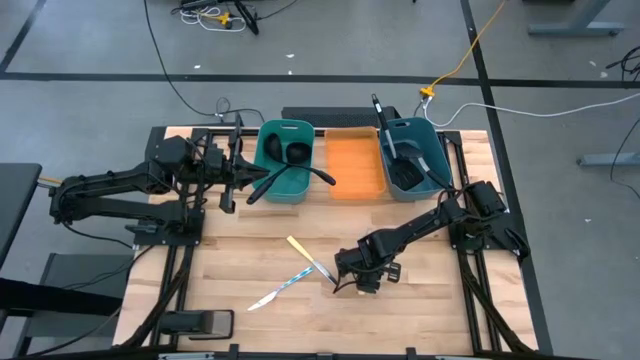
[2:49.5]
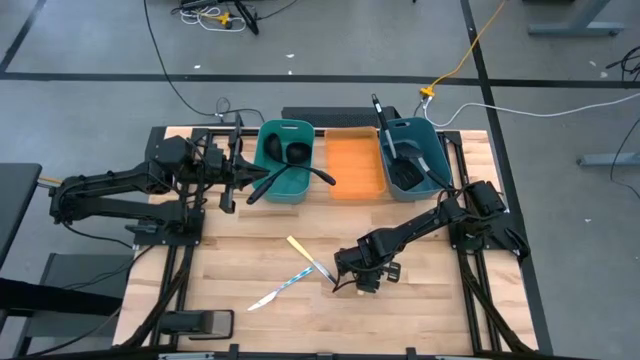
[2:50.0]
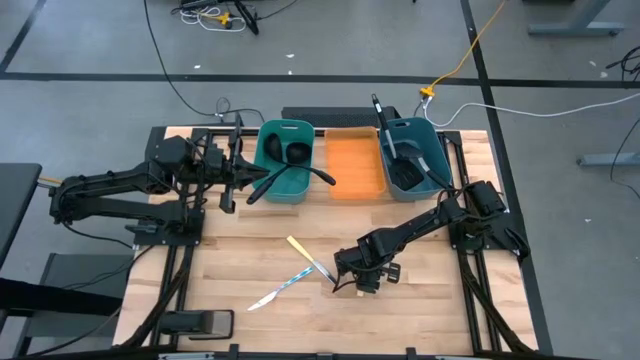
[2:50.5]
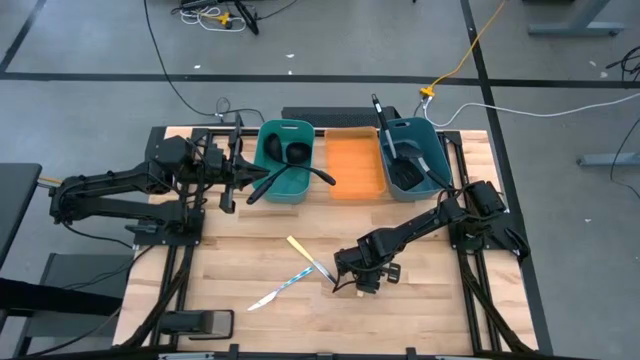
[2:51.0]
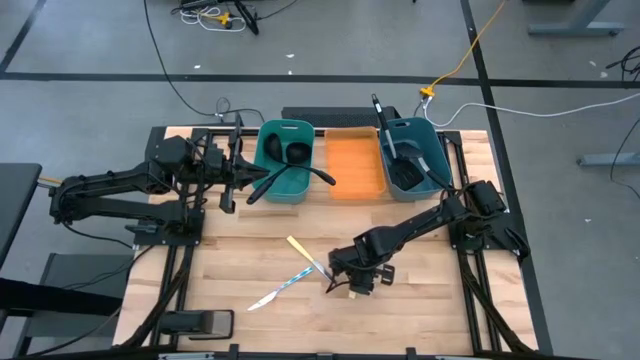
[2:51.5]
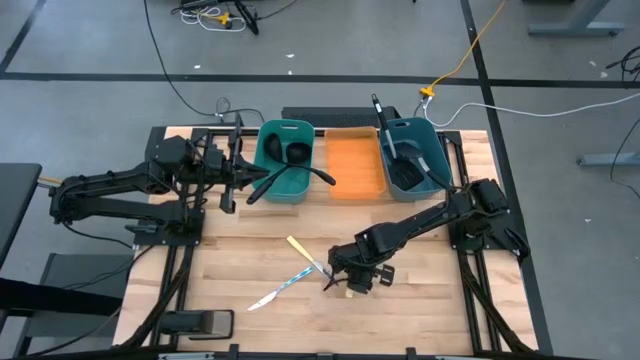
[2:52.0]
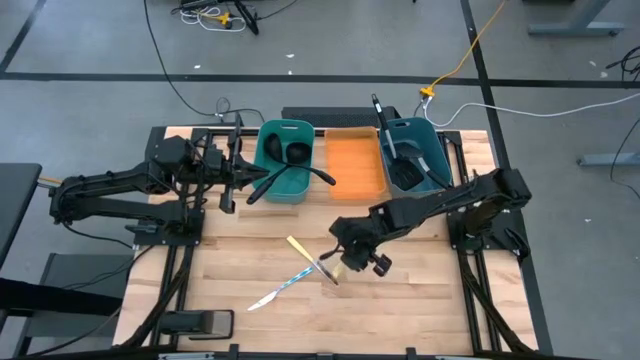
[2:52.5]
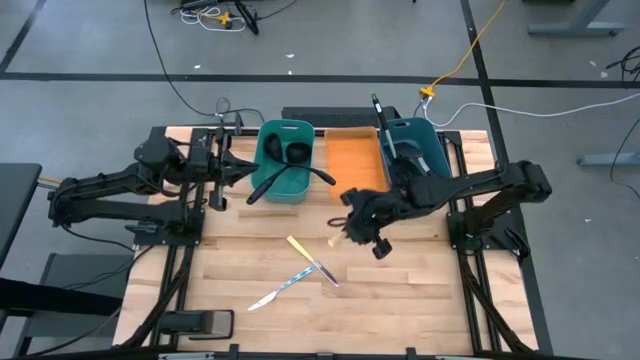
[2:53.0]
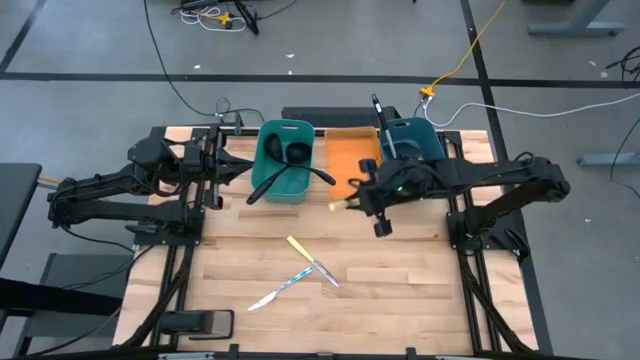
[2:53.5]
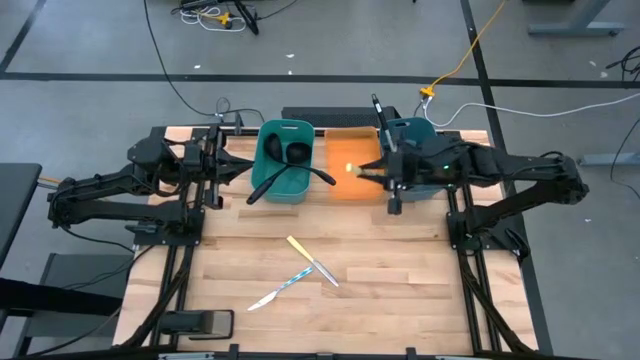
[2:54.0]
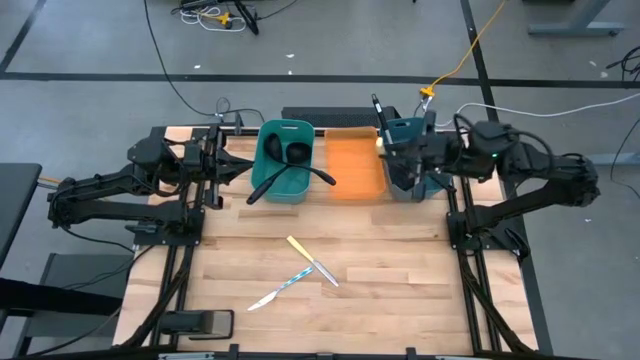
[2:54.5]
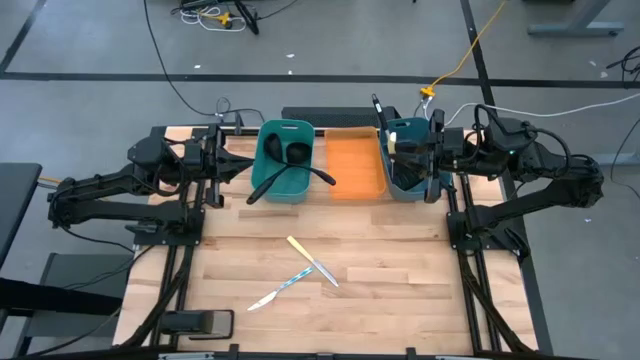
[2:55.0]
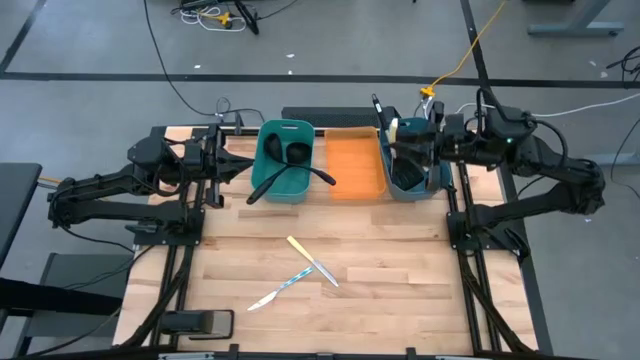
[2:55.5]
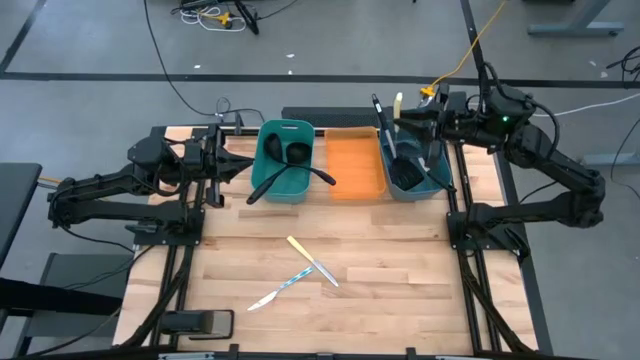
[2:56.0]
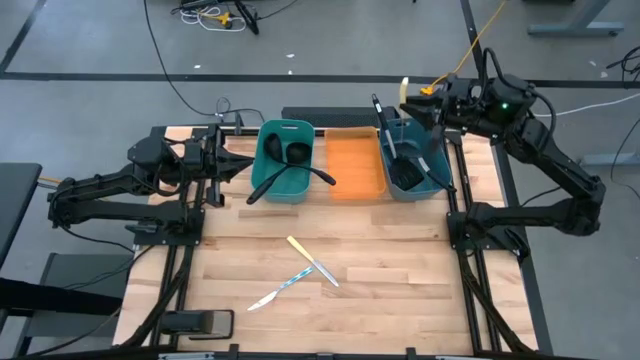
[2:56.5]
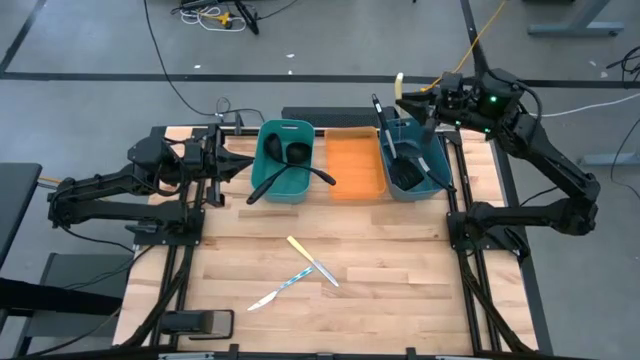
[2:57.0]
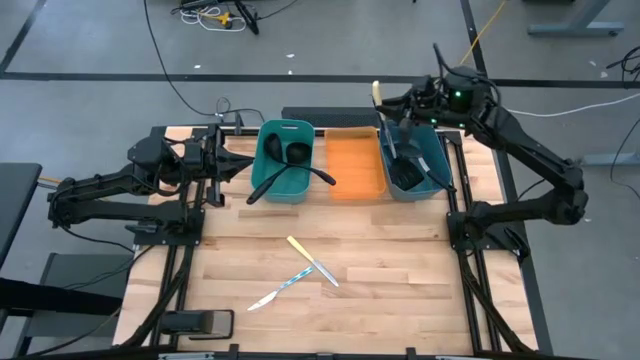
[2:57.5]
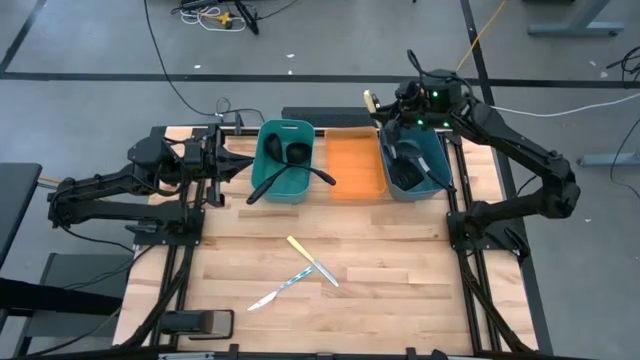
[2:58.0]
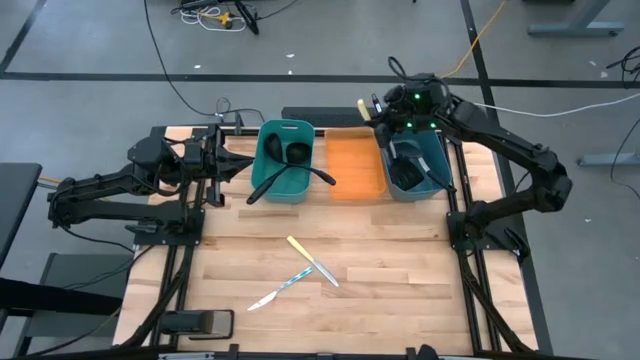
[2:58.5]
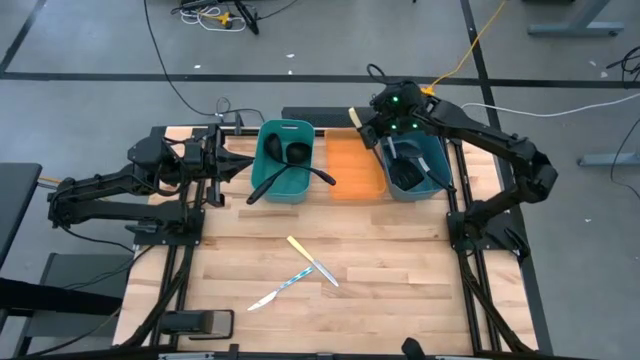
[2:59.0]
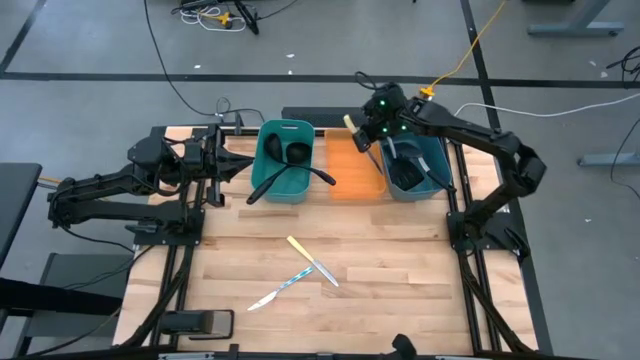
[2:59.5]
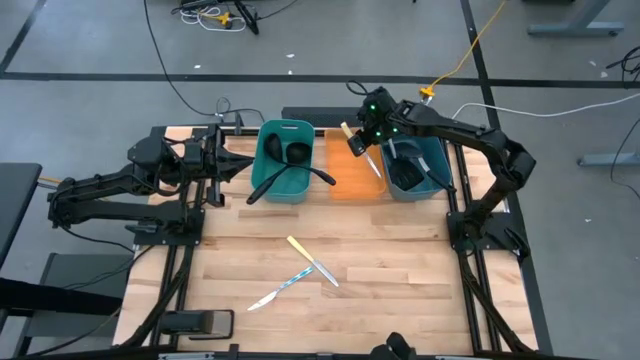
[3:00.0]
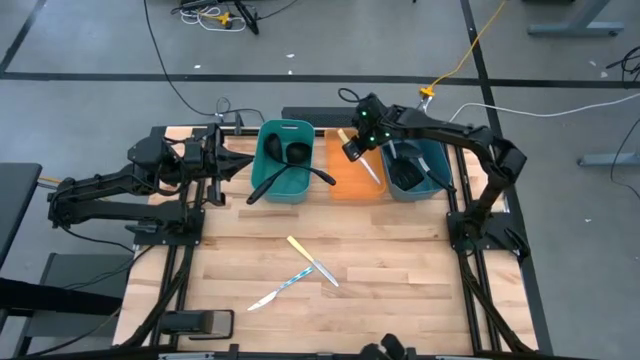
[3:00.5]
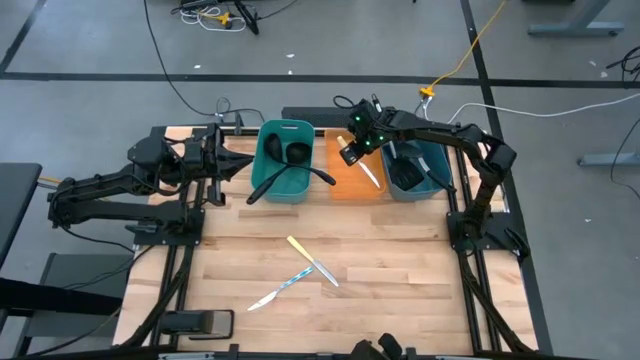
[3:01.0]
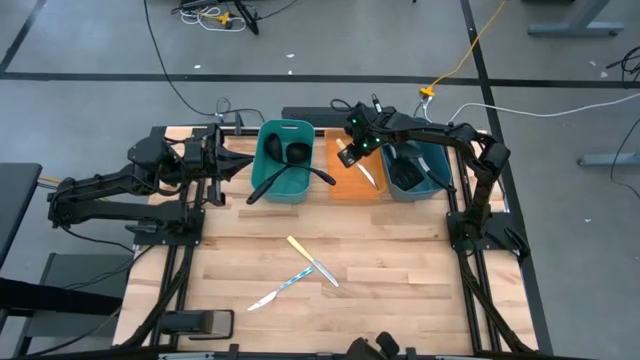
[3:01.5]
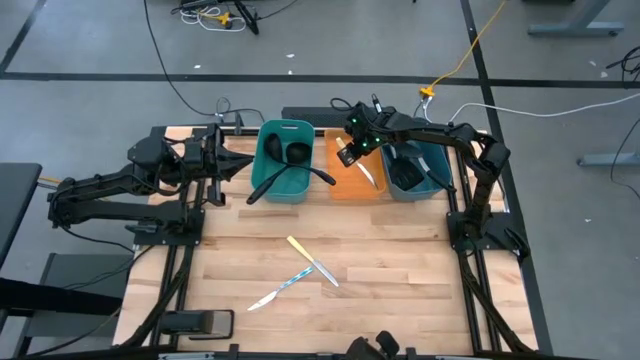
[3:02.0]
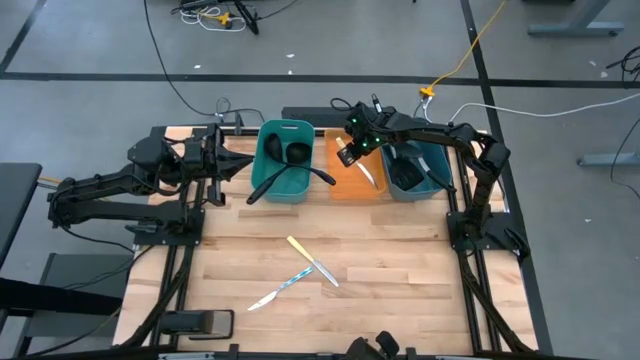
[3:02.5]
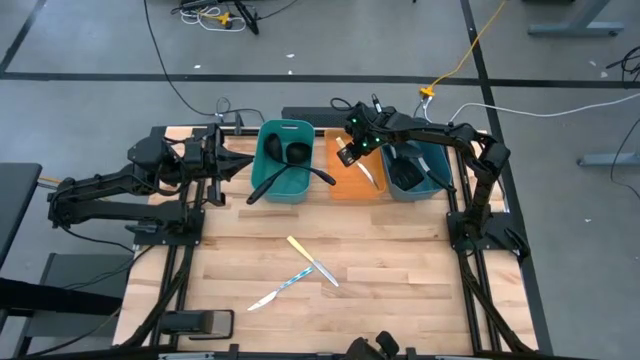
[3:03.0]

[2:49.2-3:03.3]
Task: Pick & Place Kitchen Items
Put the right yellow table knife into the orange bin

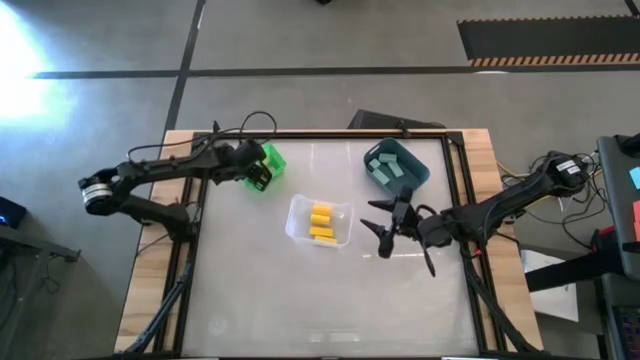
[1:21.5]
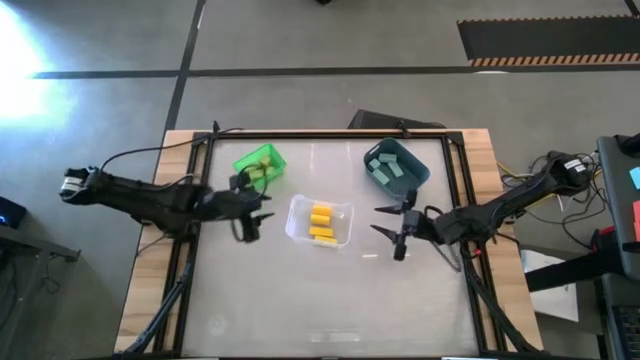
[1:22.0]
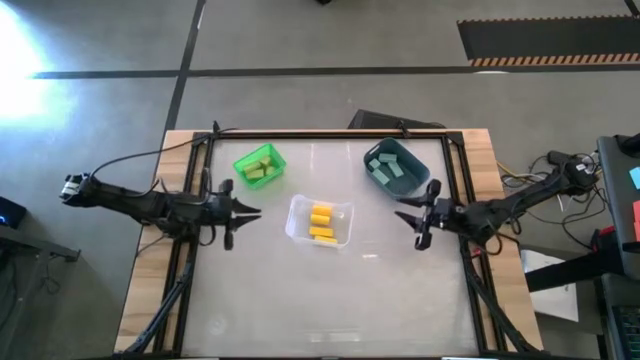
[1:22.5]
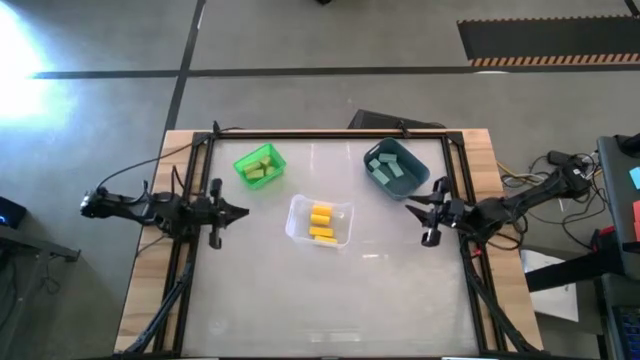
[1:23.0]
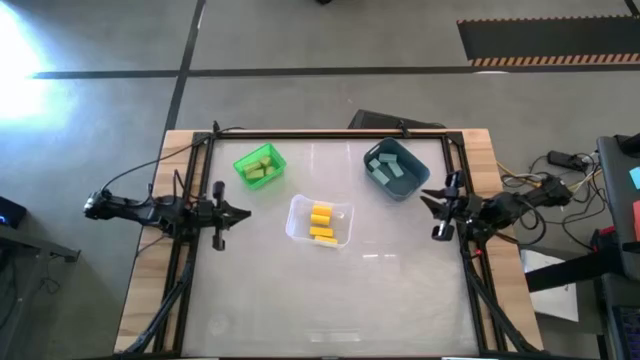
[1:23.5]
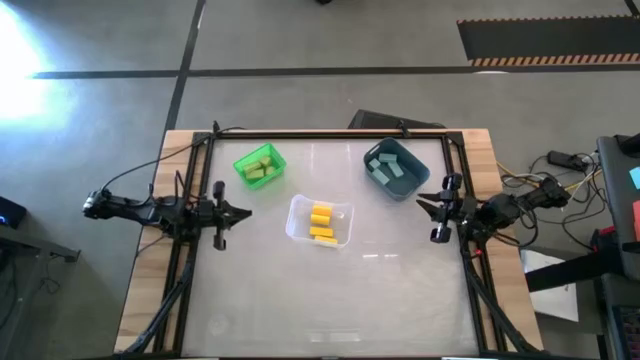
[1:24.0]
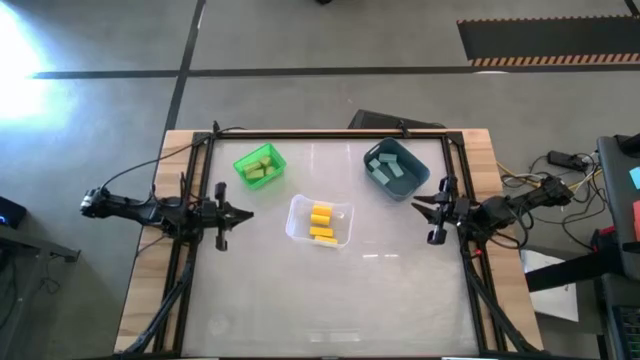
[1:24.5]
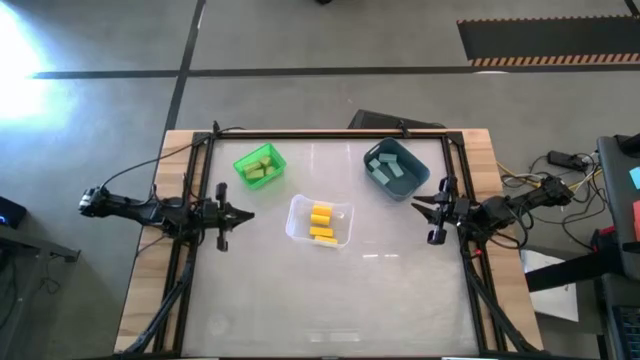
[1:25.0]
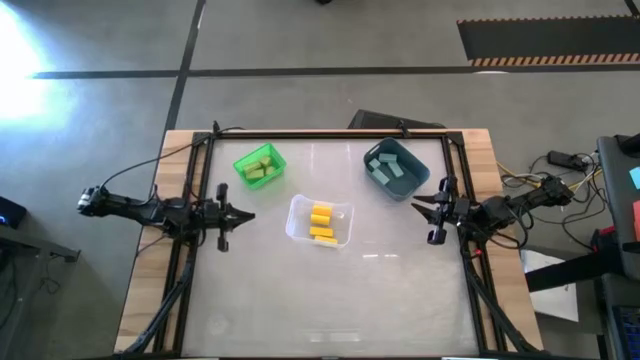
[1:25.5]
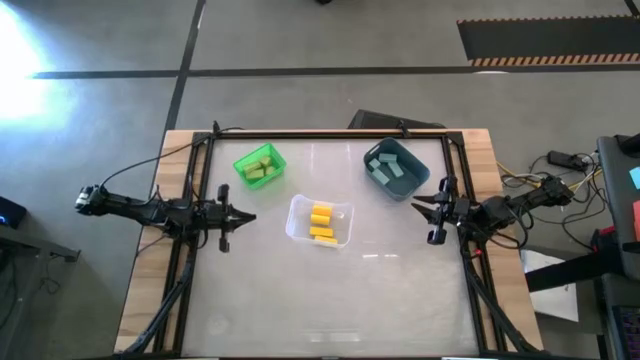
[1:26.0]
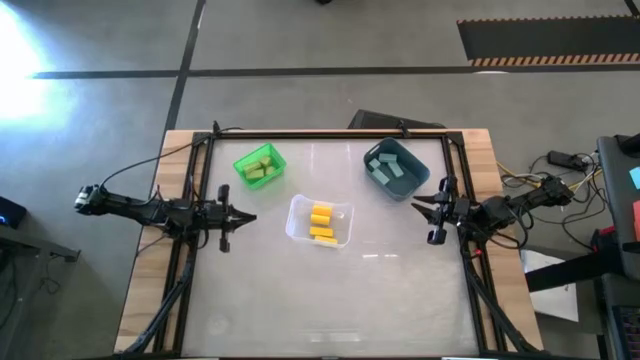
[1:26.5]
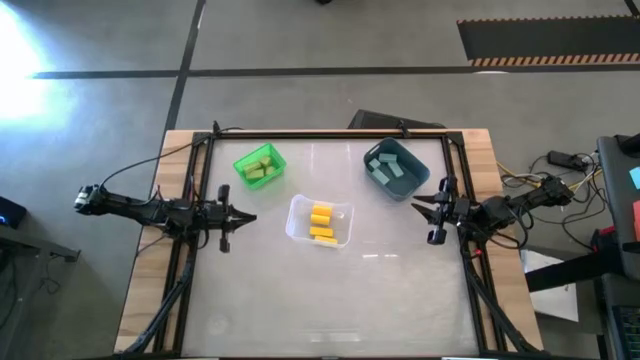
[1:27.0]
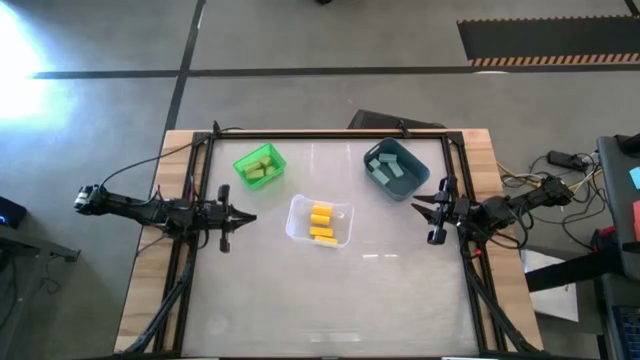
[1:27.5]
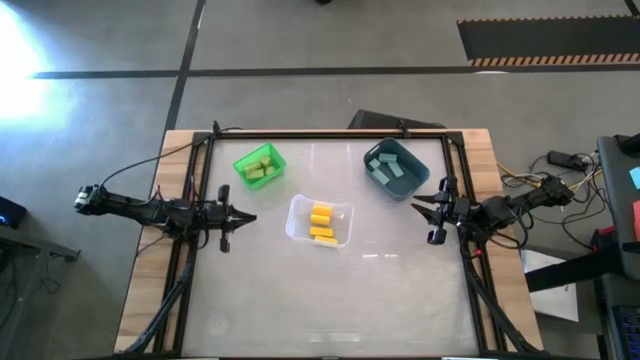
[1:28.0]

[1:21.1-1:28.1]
Task: Sort & place blocks by color
Return to Home Position
